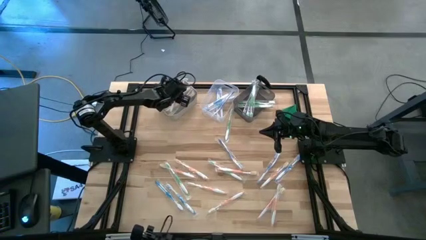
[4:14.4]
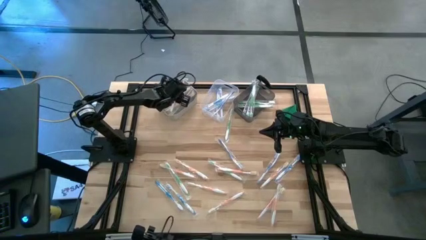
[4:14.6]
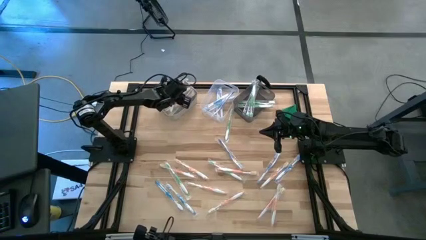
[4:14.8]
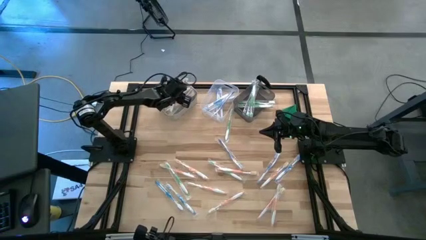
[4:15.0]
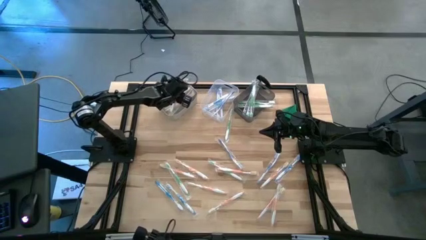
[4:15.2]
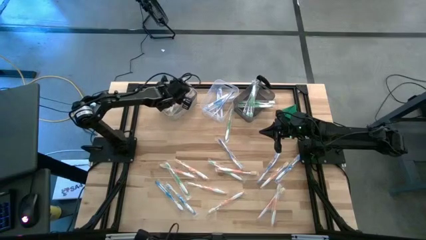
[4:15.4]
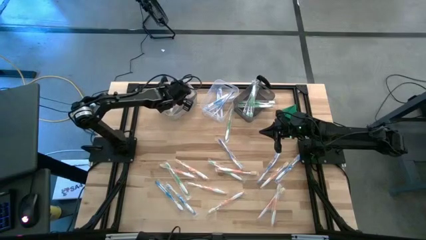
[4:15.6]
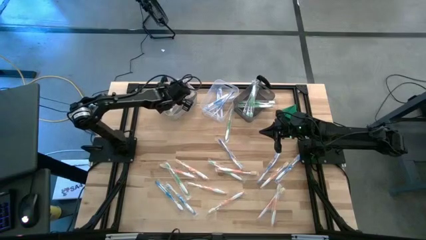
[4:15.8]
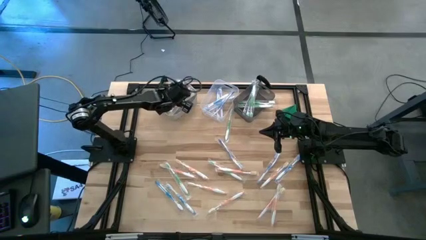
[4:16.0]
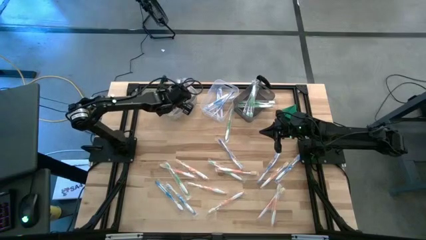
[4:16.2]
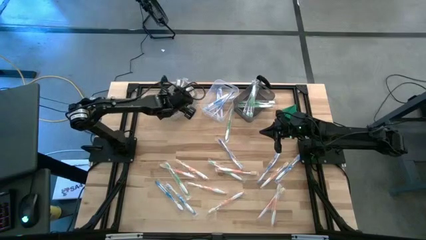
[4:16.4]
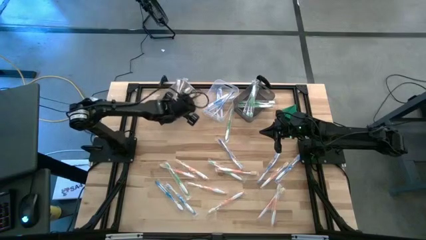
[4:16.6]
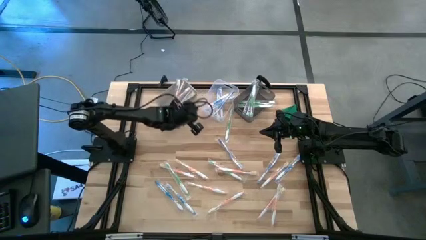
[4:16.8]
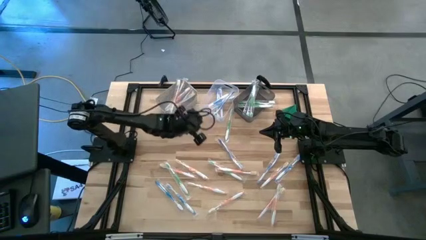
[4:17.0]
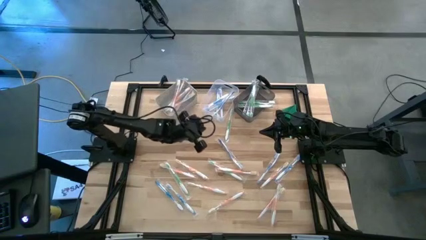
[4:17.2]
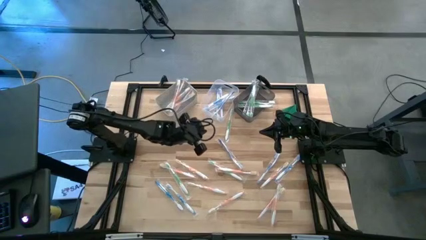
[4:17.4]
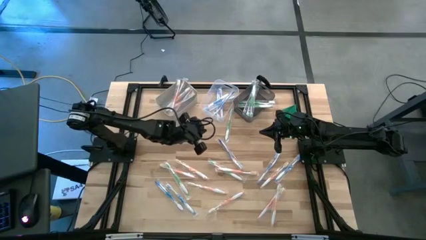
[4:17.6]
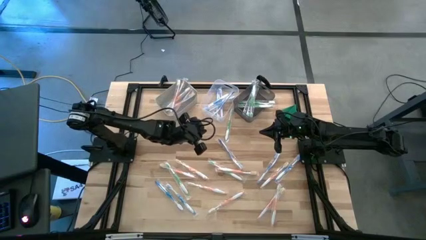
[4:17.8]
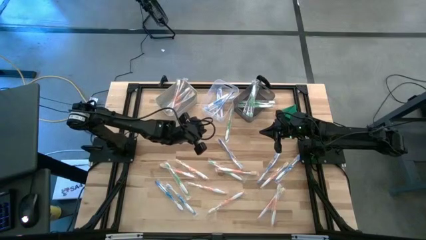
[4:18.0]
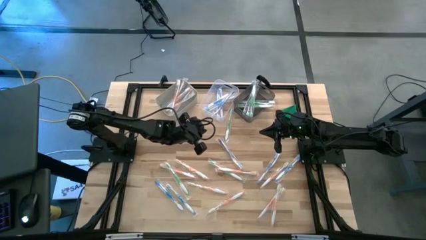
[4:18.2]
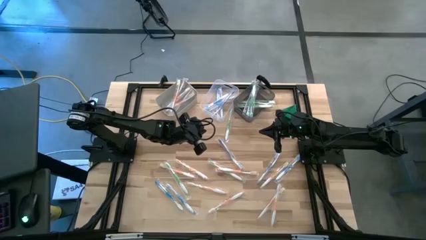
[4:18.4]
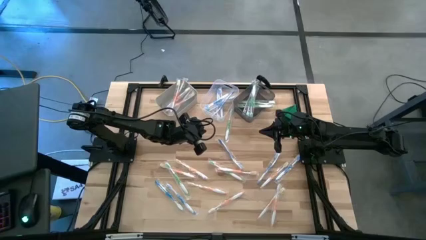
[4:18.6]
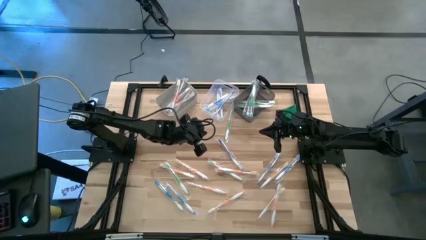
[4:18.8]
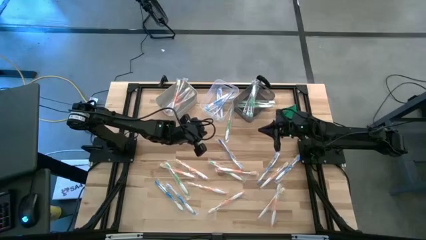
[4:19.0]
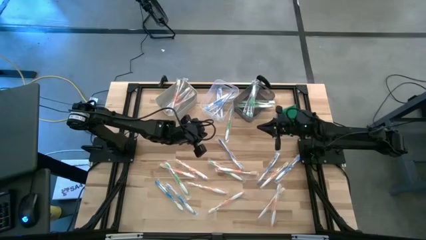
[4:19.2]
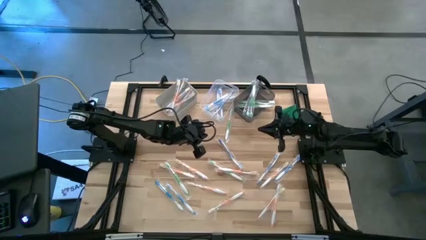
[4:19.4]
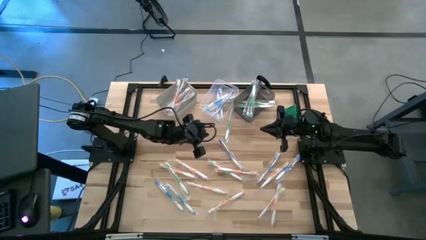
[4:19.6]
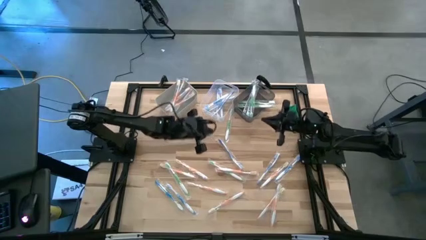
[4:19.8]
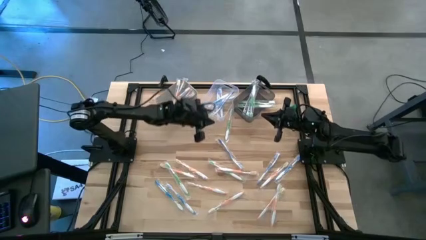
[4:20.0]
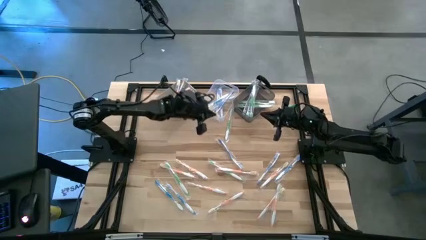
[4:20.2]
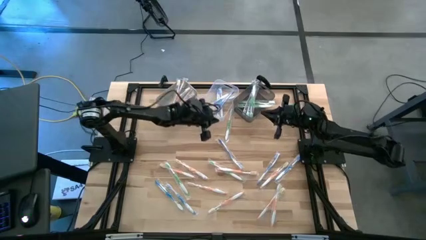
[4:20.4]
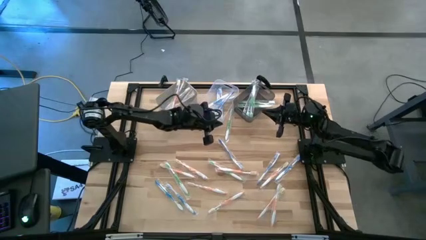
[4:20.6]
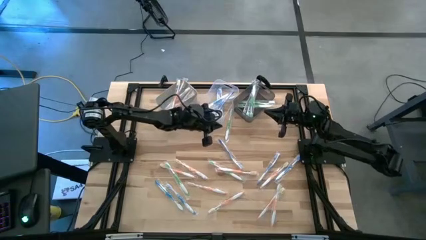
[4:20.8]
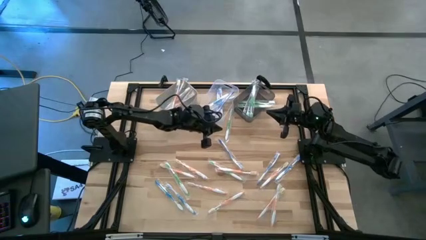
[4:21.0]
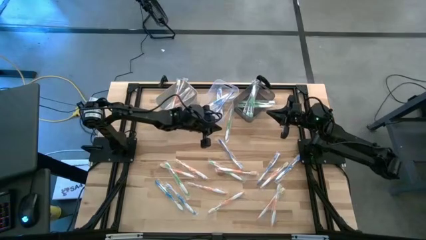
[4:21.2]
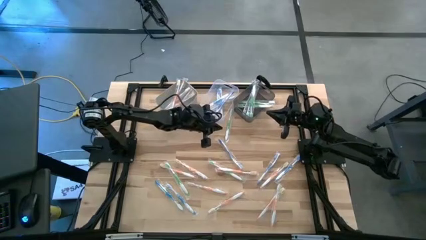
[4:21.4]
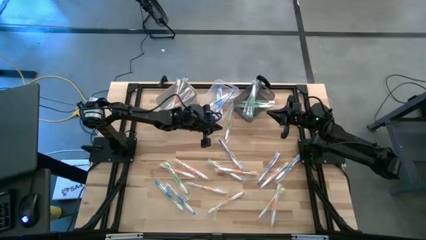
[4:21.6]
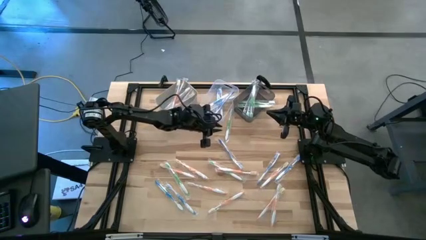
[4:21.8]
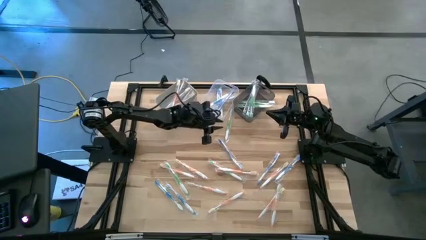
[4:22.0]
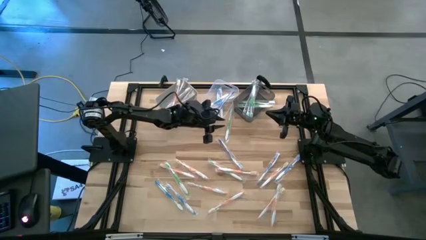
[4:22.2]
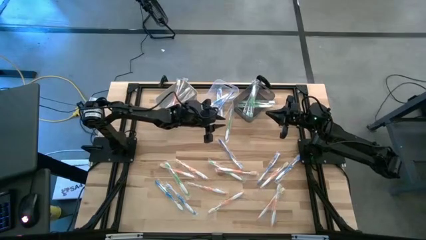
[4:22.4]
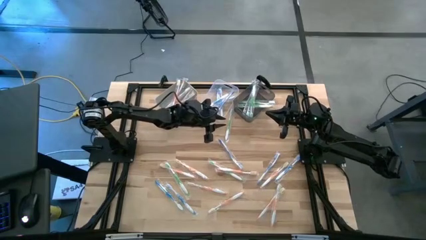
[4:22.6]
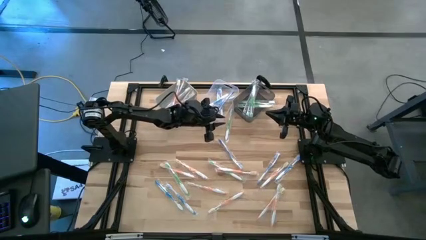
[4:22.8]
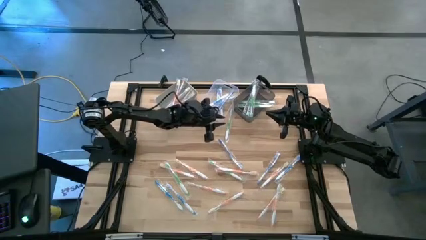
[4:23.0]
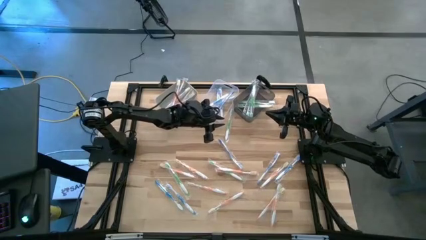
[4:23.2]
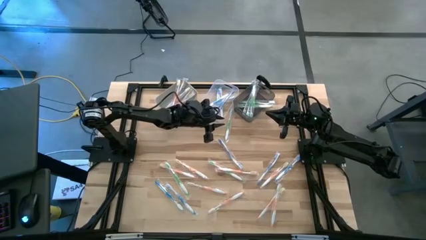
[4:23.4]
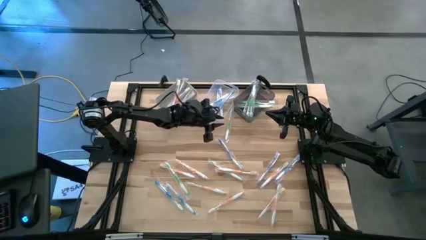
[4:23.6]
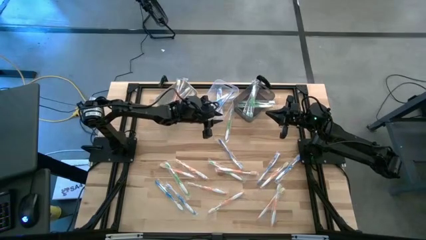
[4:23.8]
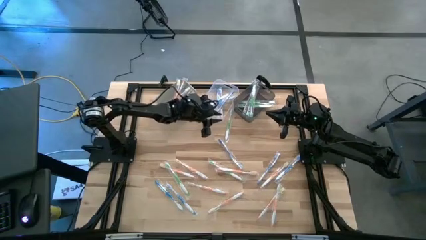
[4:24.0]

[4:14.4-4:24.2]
Task: Pick & Place Toothbrushes
Put the blue toothbrush into the transparent bin

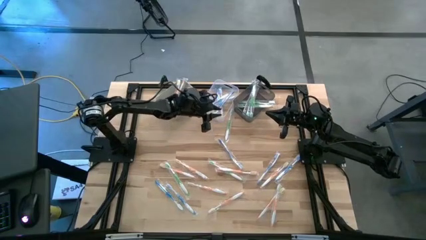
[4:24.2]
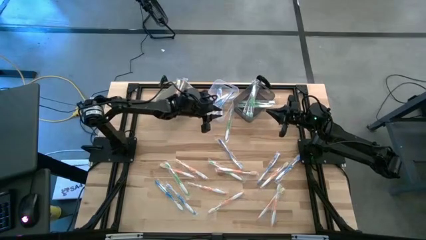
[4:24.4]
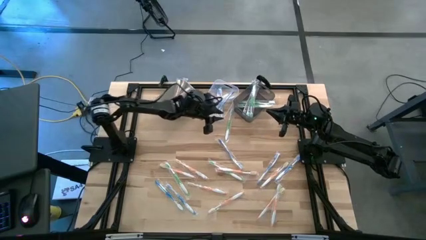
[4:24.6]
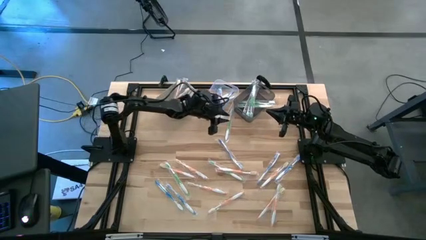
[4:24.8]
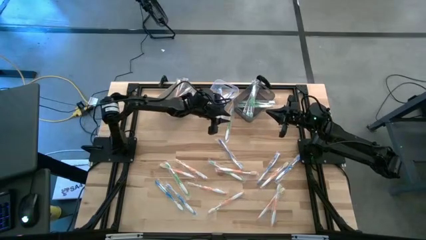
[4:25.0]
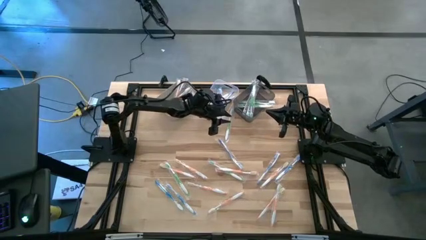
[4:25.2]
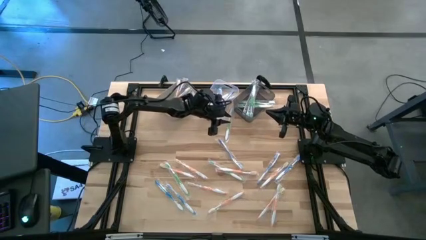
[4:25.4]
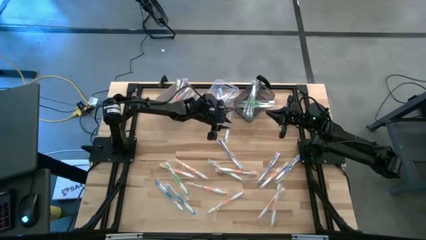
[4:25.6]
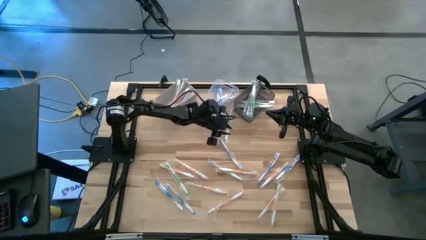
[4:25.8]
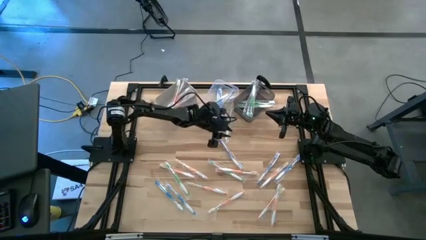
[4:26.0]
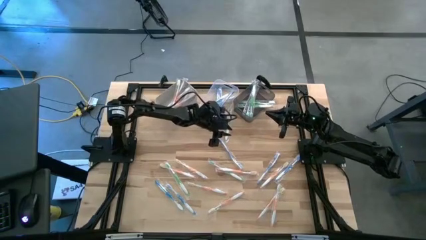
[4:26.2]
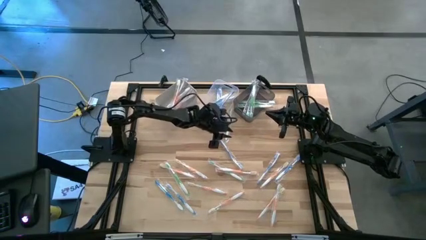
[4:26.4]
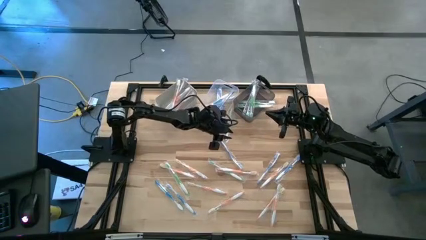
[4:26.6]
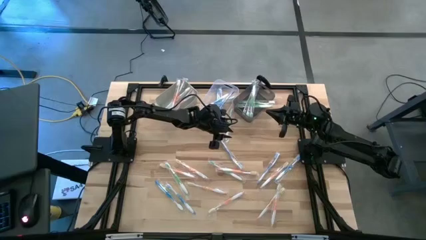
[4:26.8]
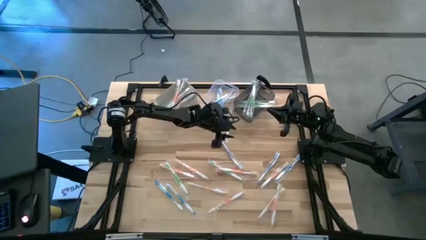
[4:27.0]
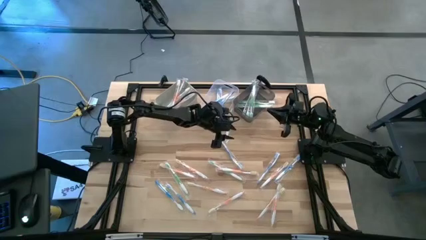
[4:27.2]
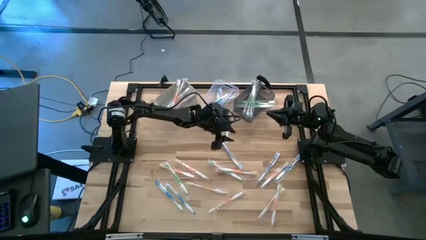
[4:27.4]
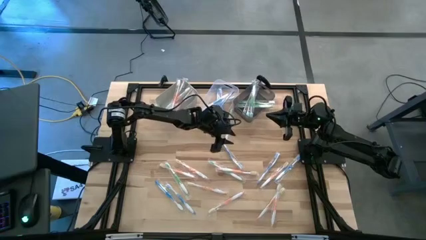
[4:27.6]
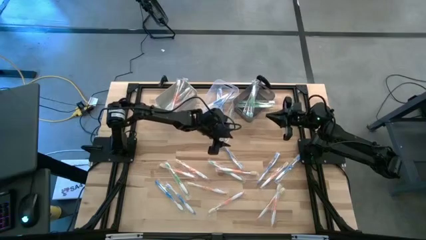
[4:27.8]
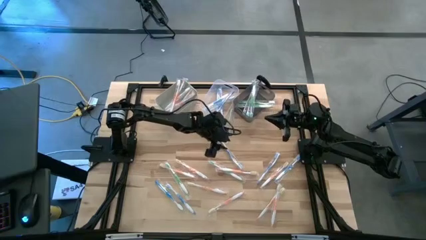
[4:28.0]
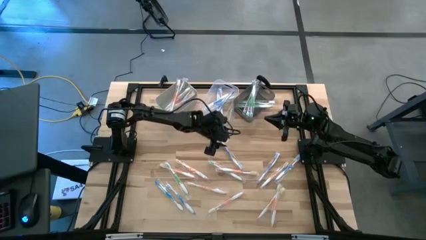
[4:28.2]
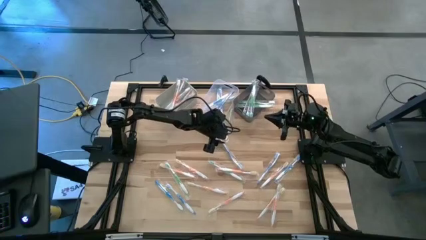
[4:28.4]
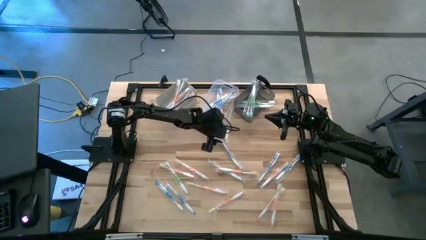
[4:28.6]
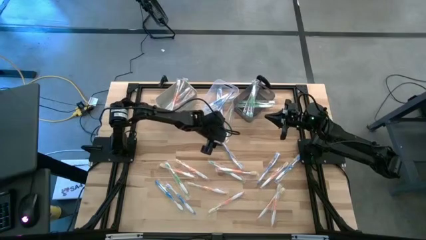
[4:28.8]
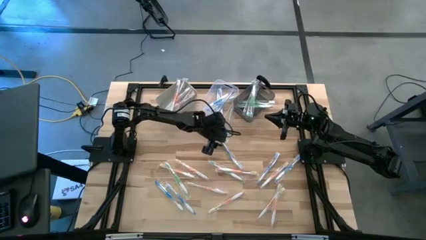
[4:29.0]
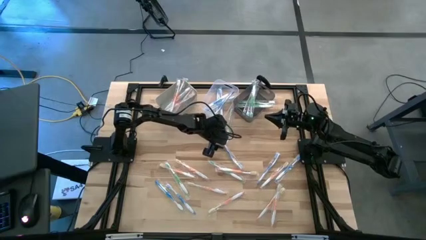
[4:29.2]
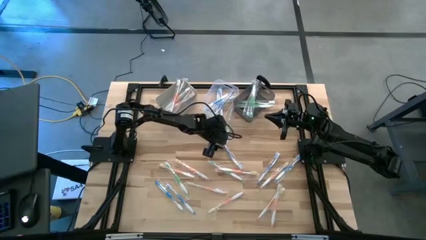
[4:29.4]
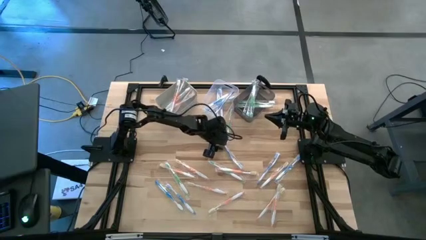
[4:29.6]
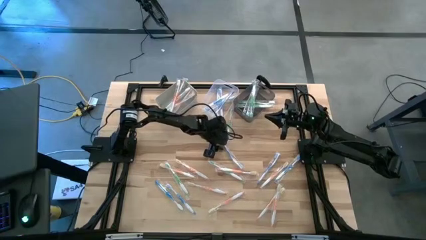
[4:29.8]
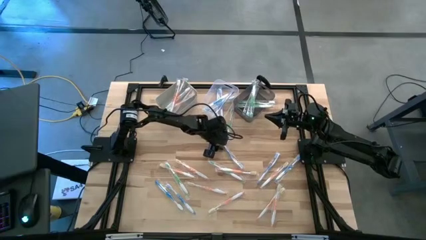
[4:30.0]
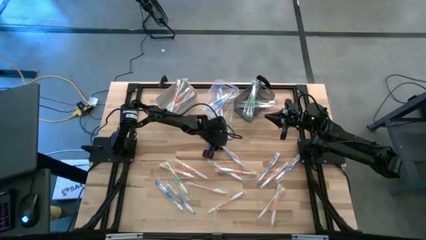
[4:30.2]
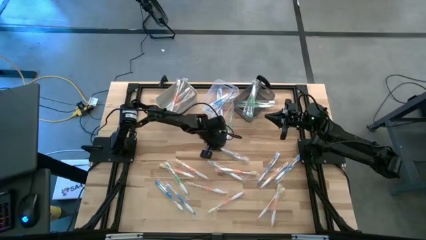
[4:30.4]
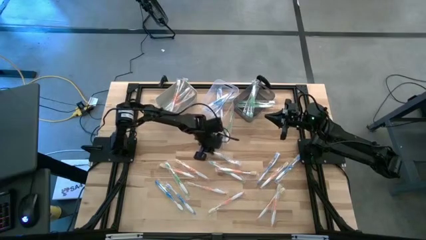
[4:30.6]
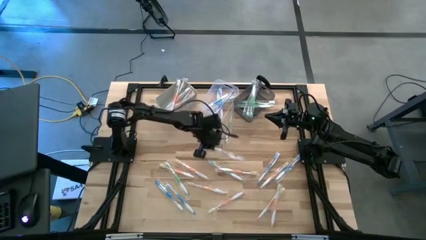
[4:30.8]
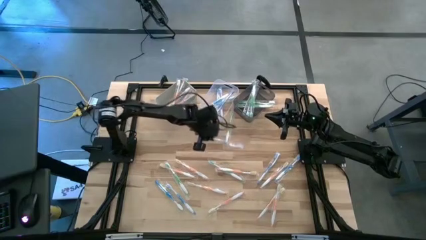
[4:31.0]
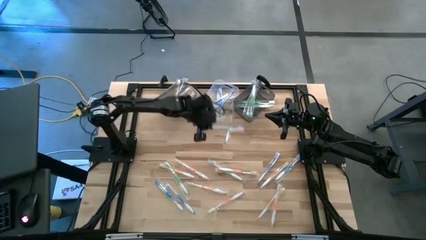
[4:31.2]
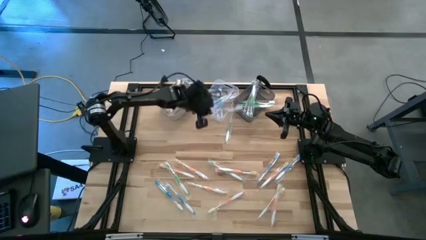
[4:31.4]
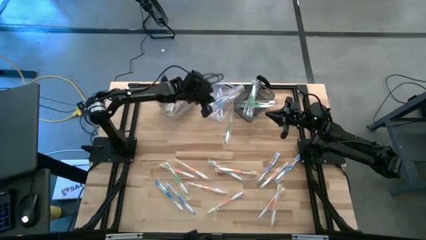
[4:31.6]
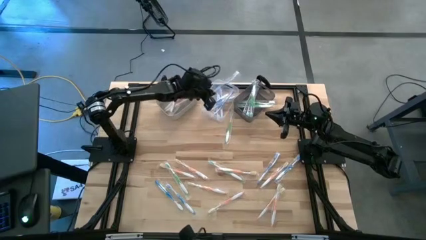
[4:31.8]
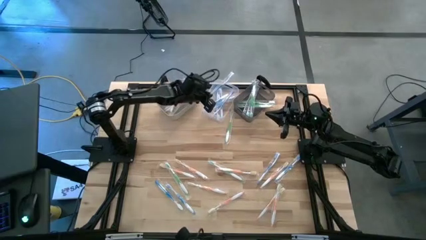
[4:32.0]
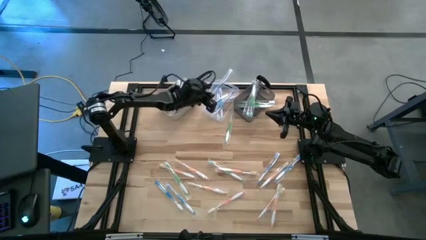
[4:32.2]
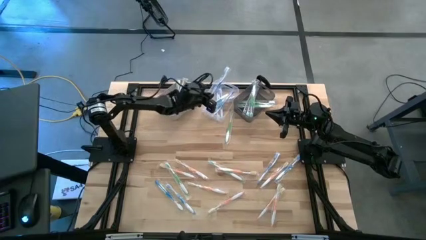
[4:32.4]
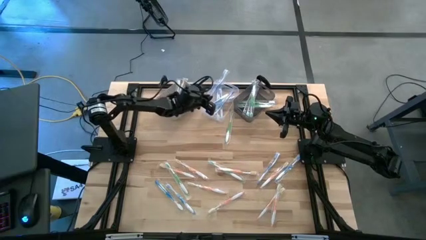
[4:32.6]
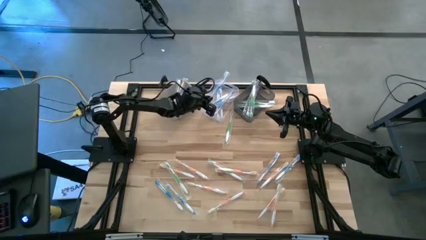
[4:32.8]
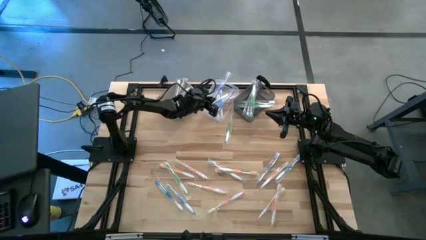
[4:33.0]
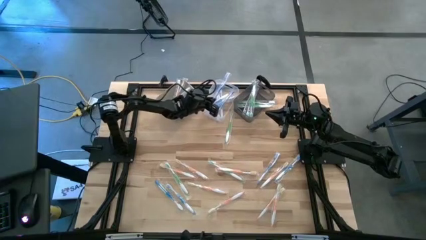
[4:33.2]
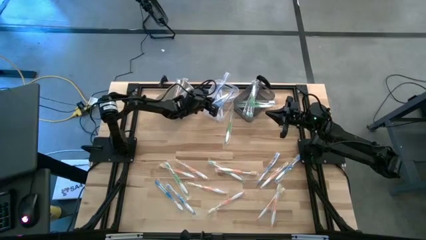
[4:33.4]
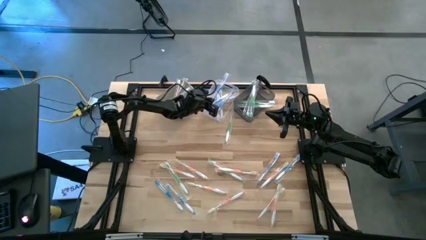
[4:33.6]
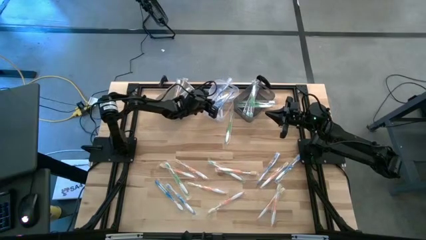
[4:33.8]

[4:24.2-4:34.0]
Put the blue toothbrush into the transparent bin
